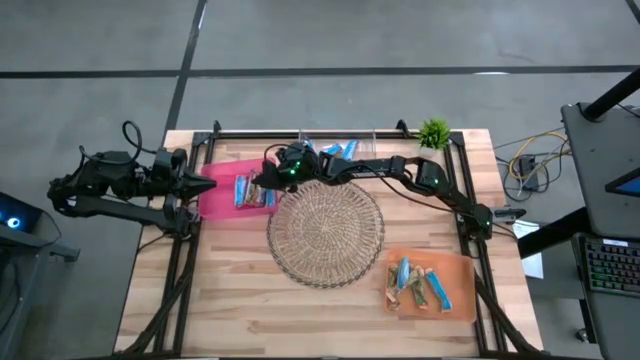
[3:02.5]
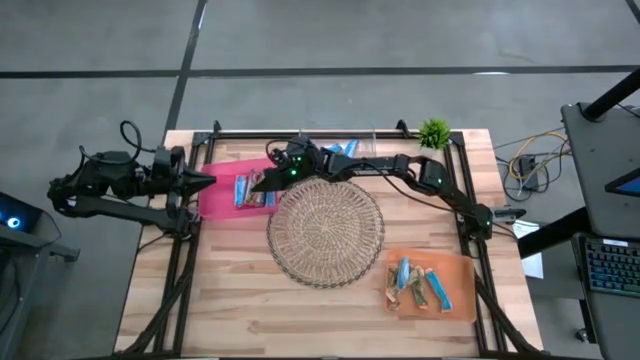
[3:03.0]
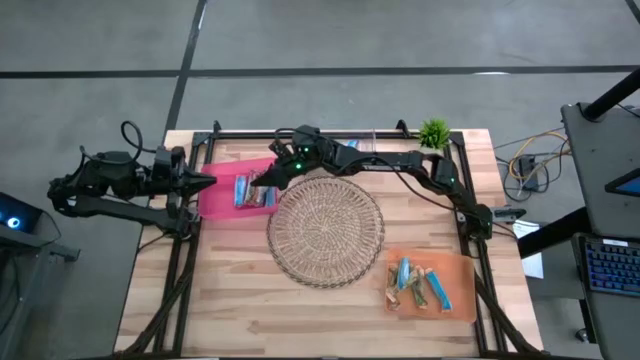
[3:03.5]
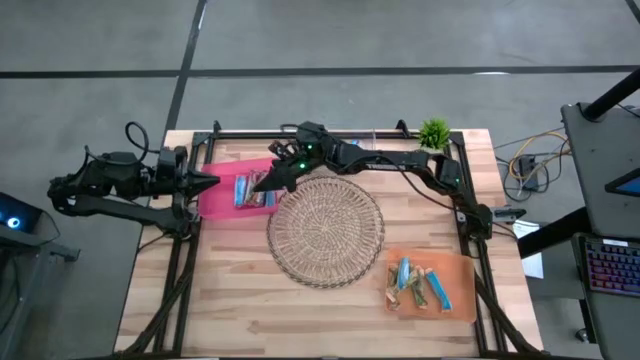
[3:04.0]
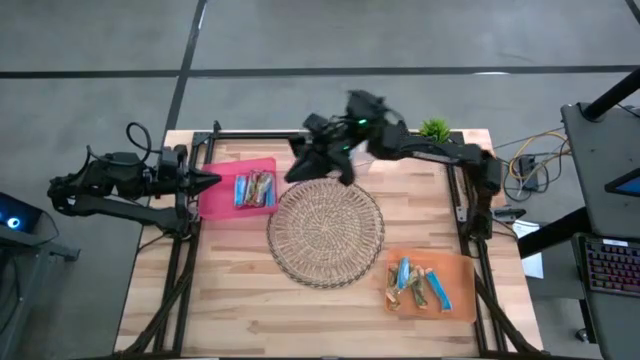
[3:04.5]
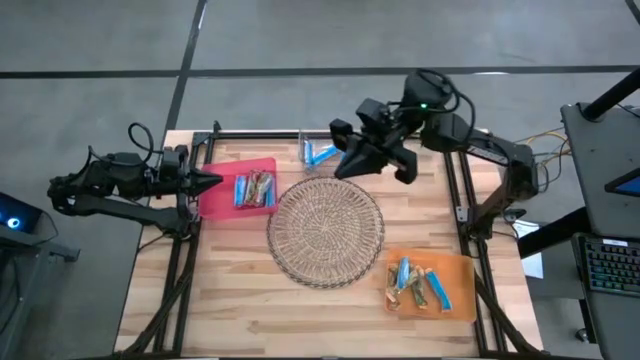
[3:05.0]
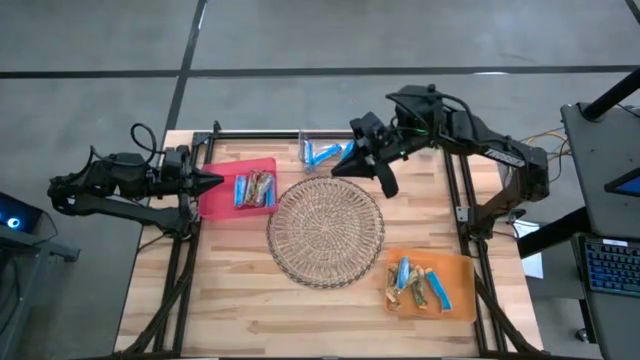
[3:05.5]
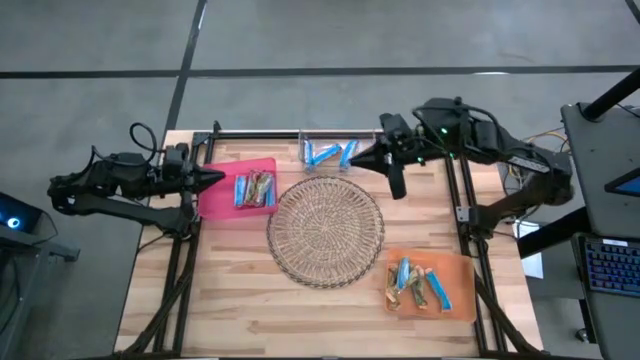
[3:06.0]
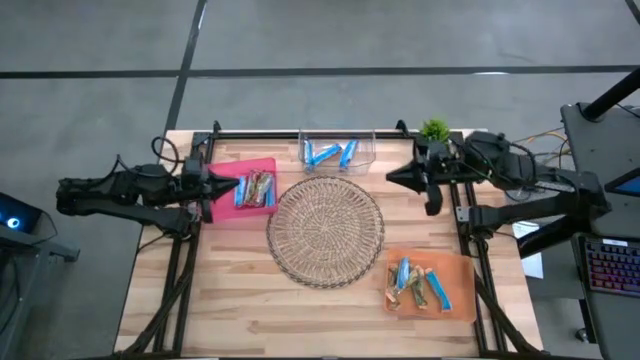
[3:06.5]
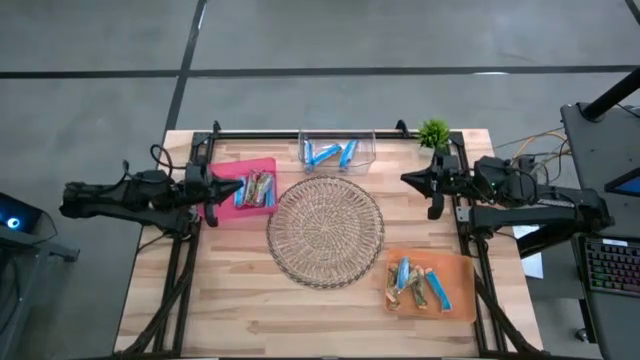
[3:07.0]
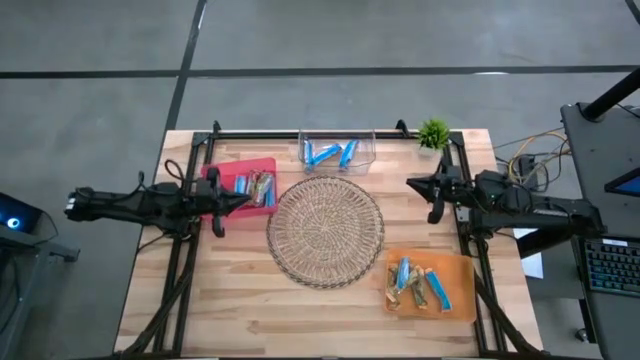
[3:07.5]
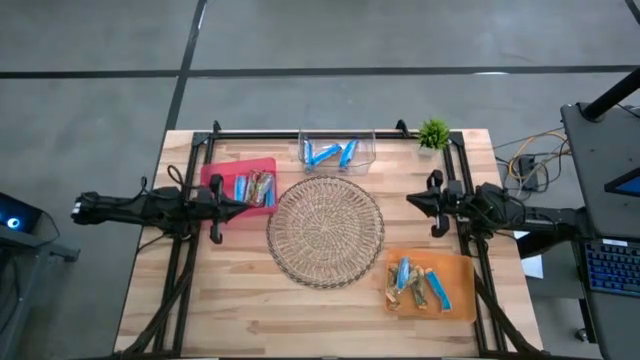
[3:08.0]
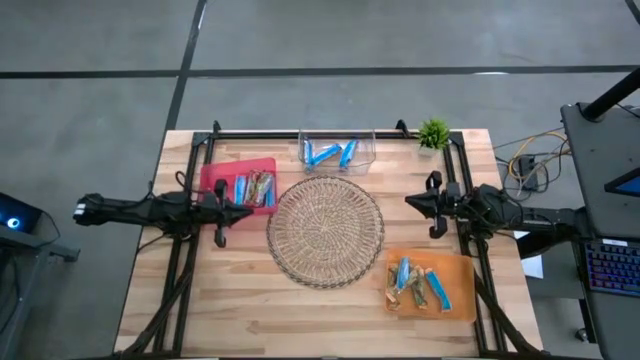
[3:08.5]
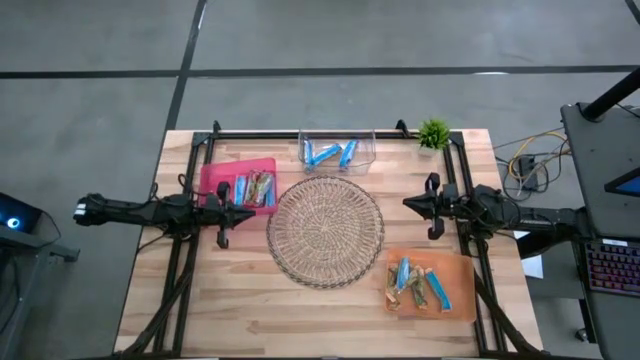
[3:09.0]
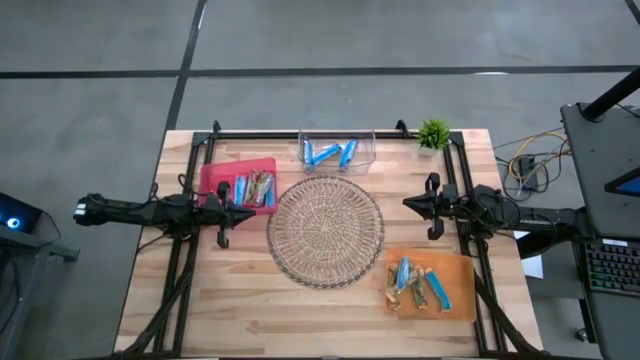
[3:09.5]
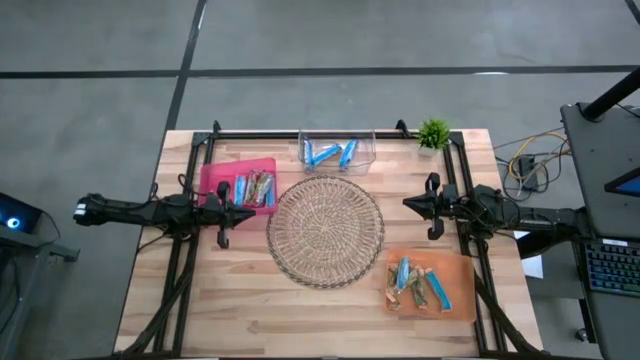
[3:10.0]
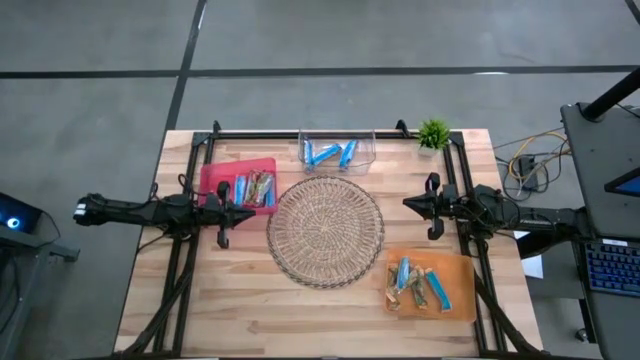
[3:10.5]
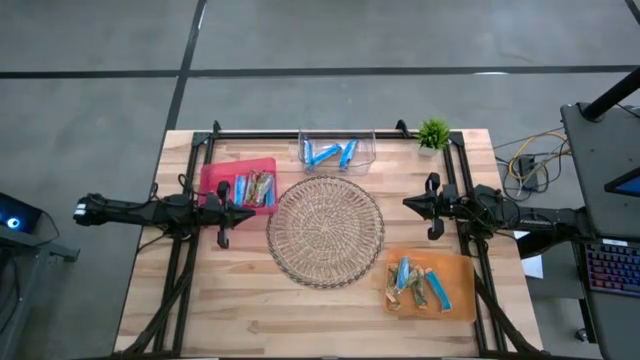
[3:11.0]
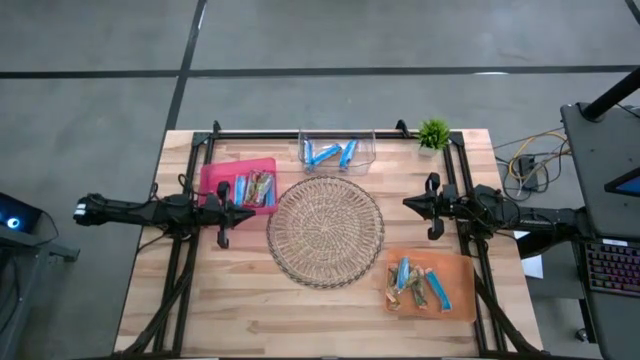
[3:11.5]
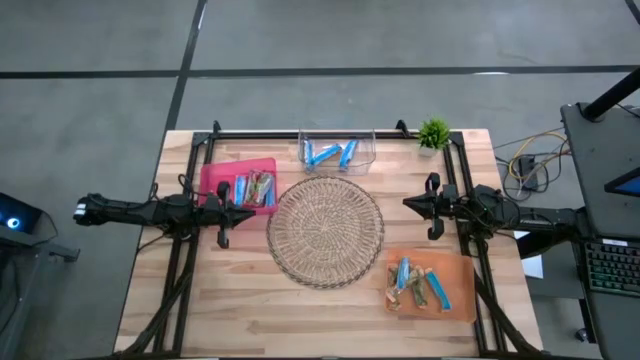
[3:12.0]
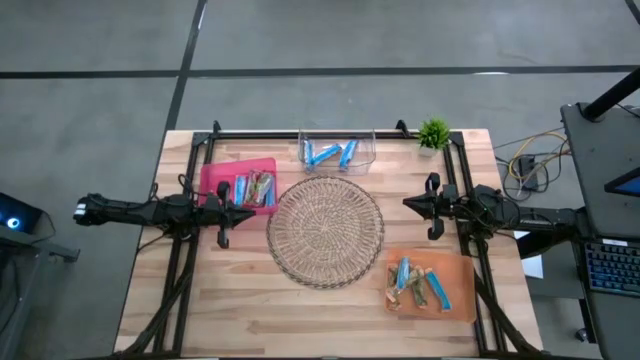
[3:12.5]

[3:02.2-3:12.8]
Task: Pick and place Granola Bars by type
Return to Home Position

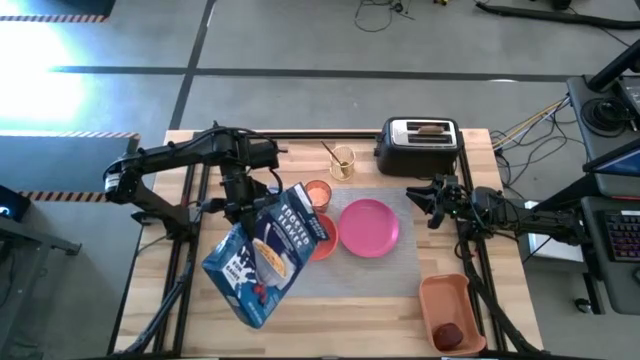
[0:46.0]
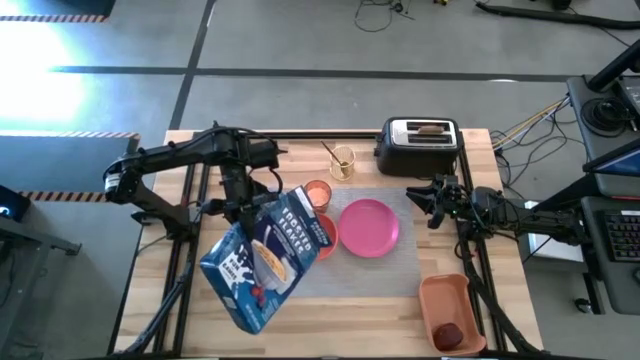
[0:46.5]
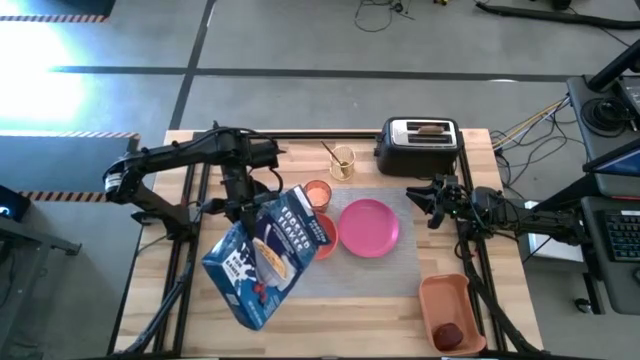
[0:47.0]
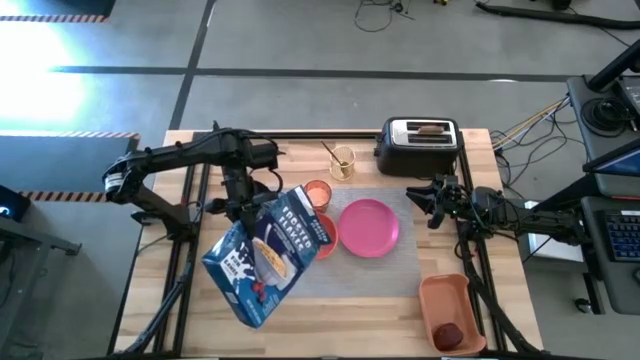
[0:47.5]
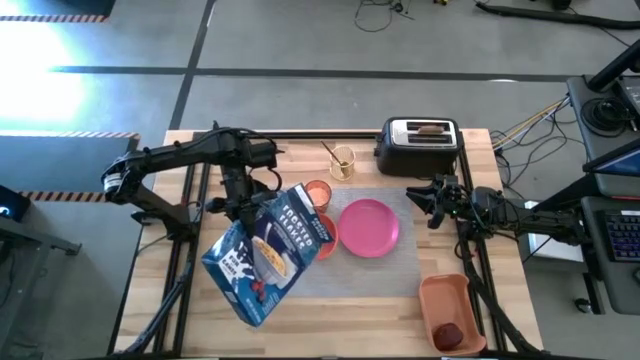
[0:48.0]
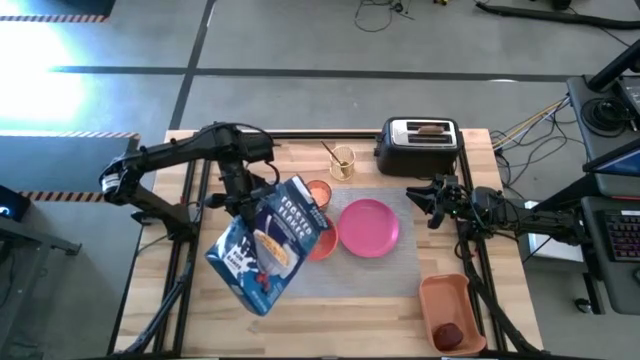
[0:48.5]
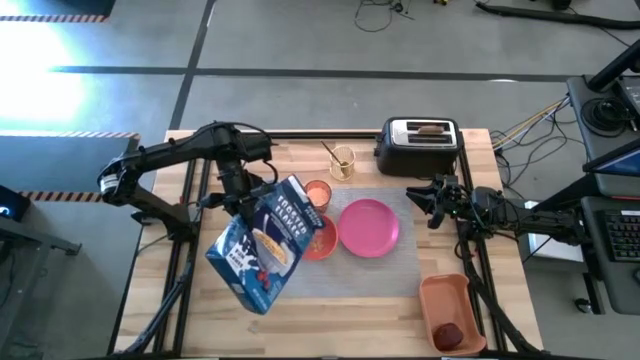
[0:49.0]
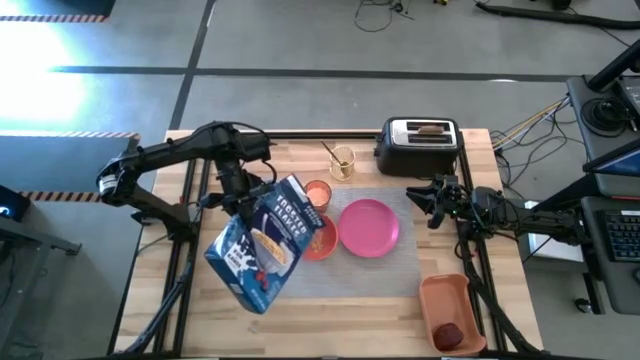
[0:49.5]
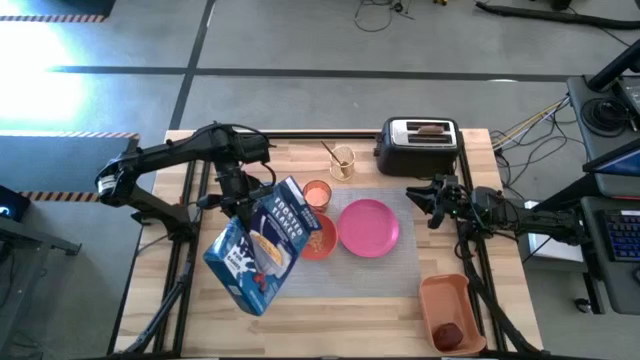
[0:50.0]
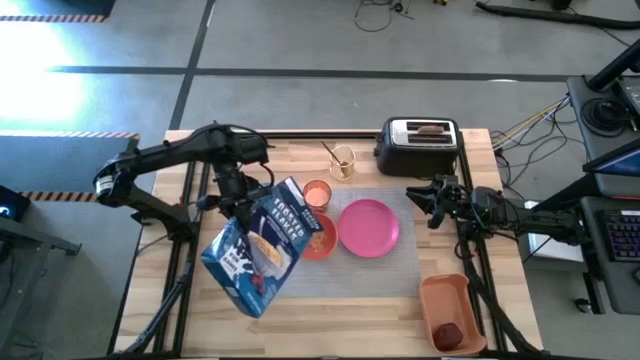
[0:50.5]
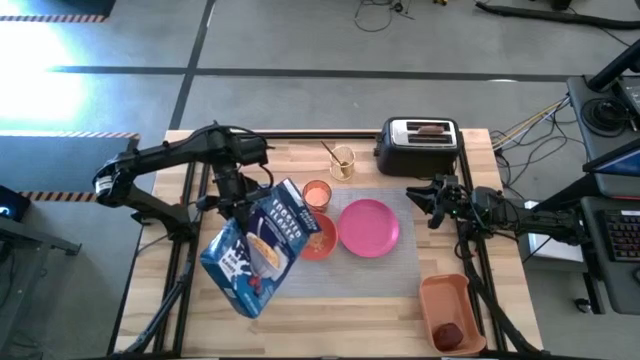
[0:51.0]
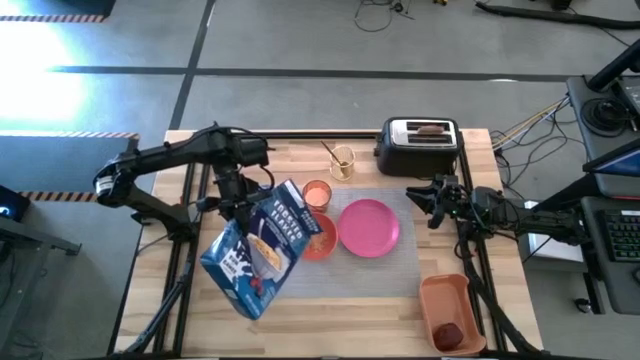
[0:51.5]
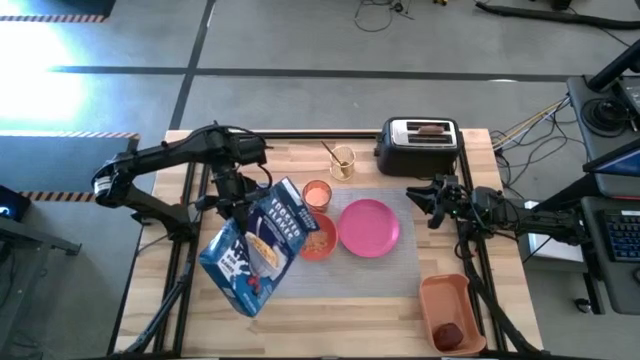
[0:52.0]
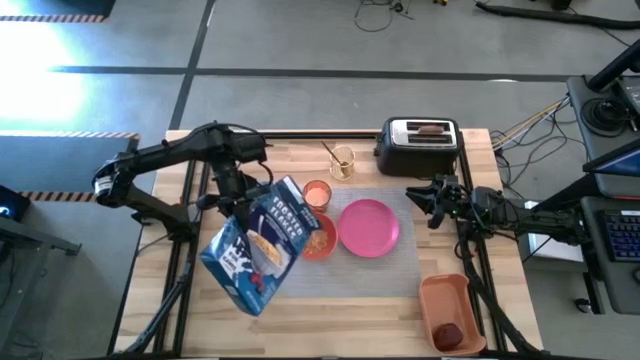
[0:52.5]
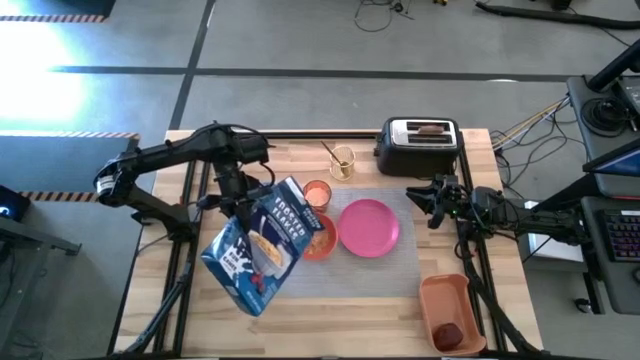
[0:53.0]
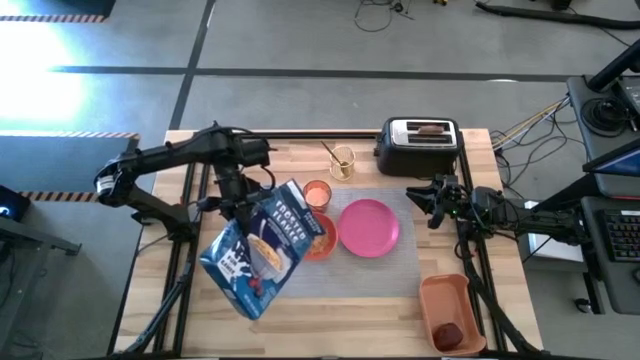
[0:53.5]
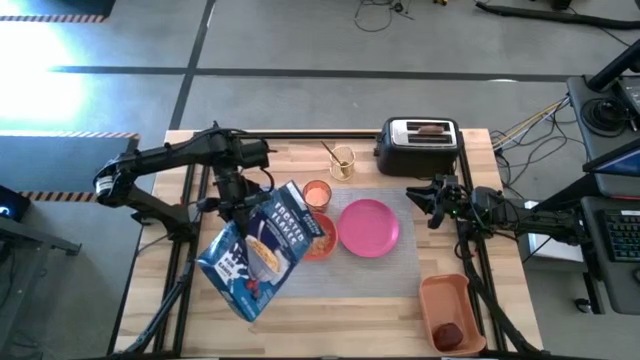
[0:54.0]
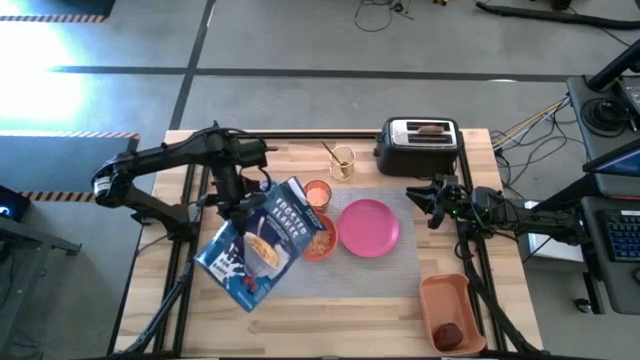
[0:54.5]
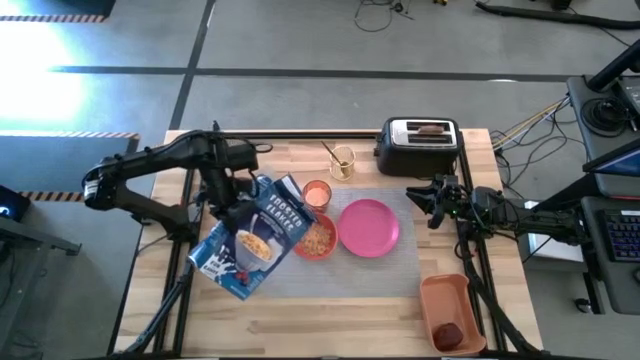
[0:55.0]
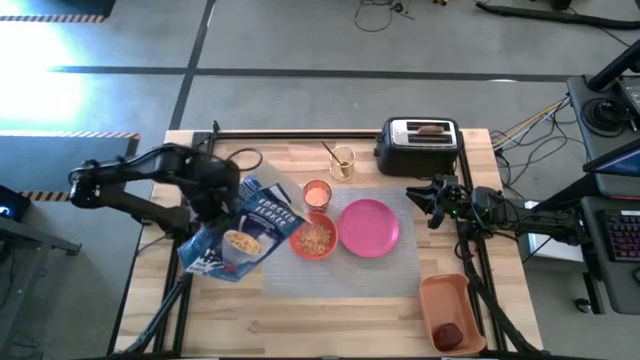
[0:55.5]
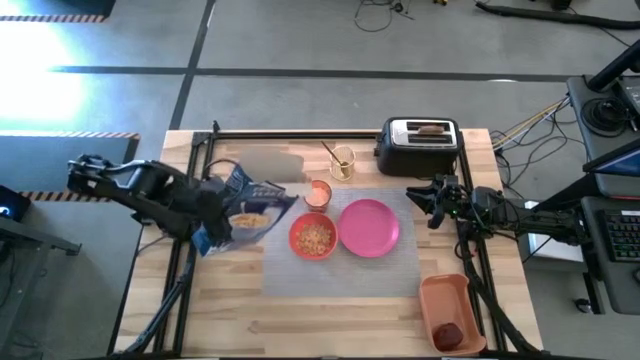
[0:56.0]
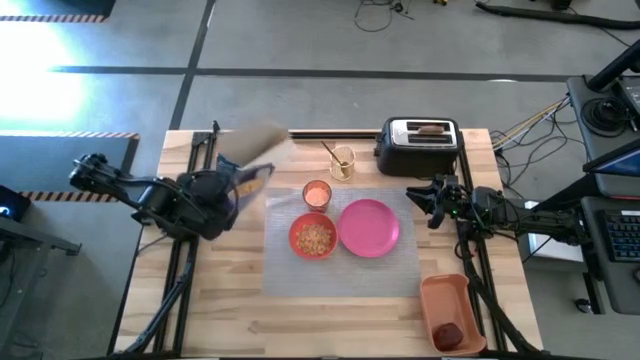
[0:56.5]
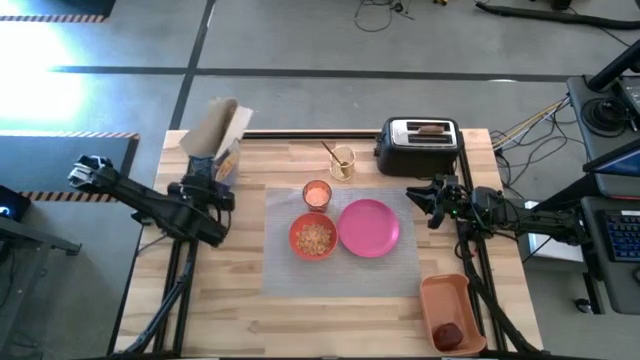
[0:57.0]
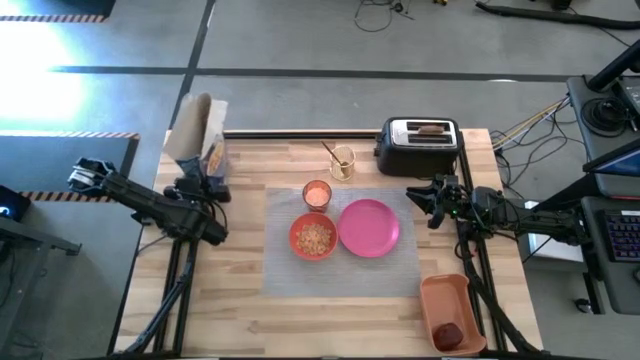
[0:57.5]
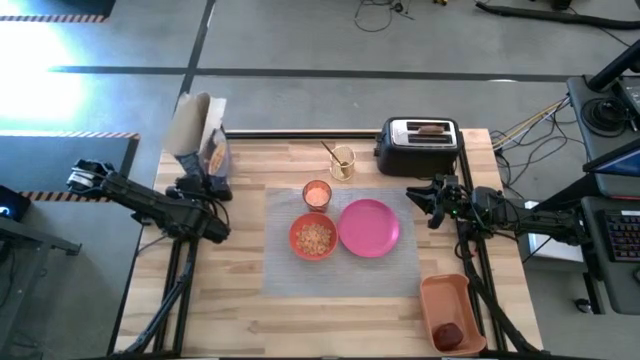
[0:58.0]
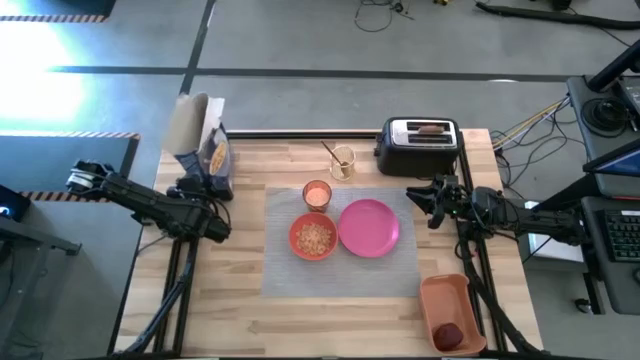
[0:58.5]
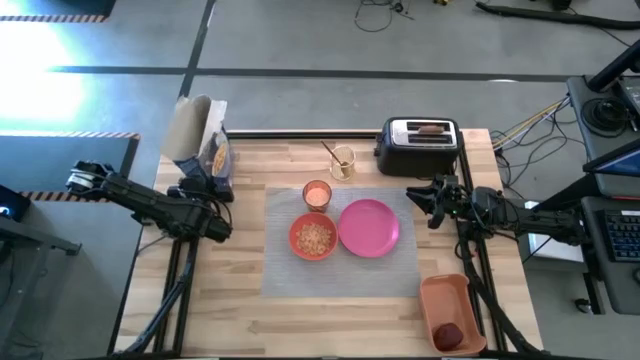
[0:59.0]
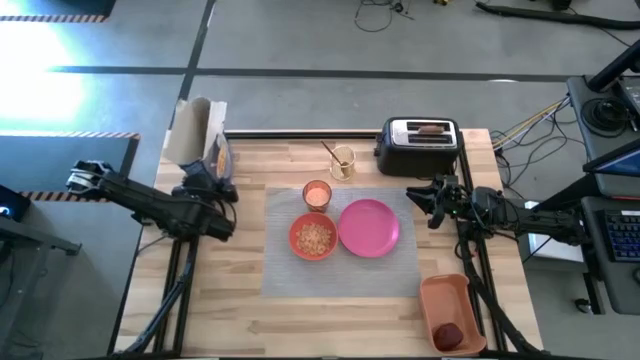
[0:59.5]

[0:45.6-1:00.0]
Task: Arrange a breakfast setting
Pour the cereal from the blue cereal box into the orange bowl on the gray tablemat
